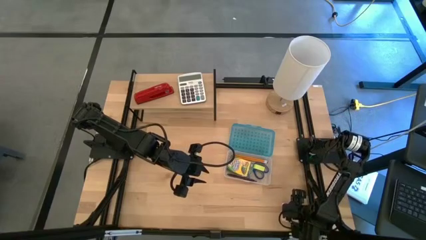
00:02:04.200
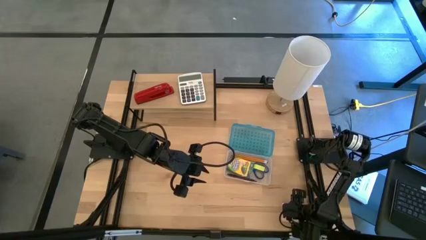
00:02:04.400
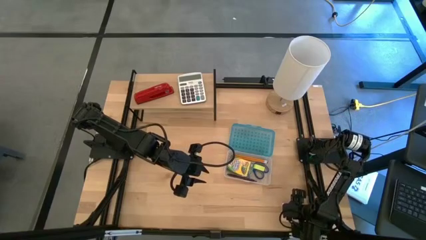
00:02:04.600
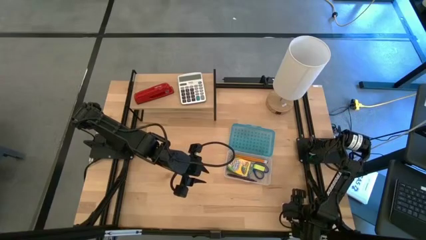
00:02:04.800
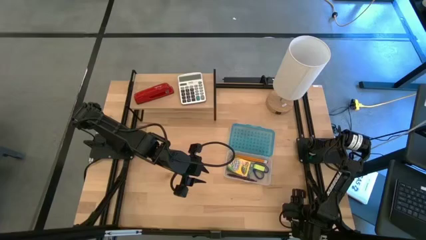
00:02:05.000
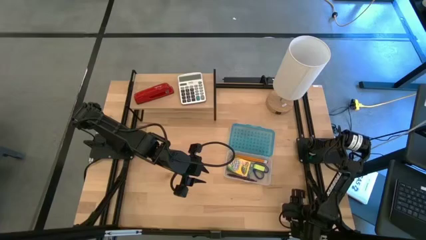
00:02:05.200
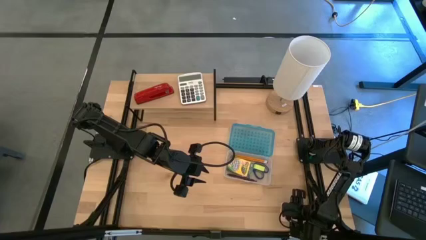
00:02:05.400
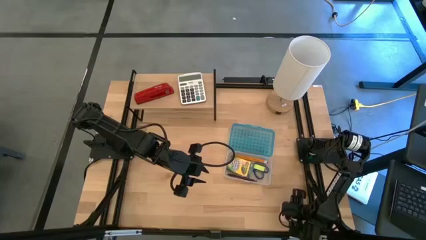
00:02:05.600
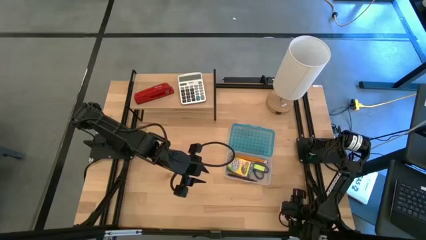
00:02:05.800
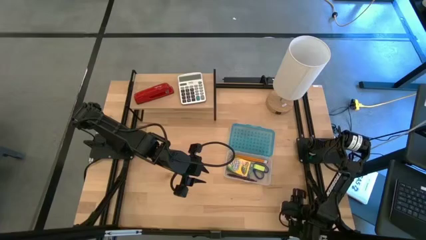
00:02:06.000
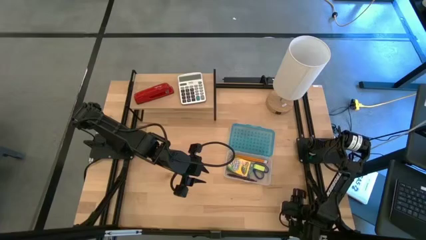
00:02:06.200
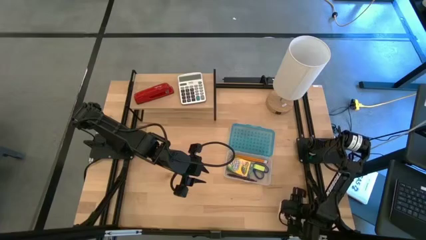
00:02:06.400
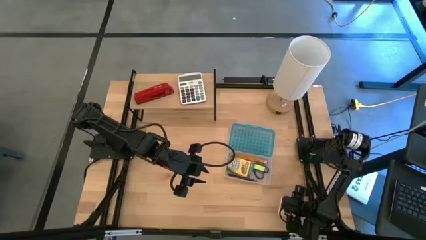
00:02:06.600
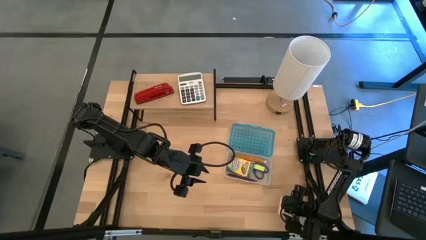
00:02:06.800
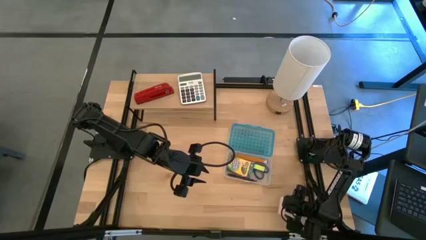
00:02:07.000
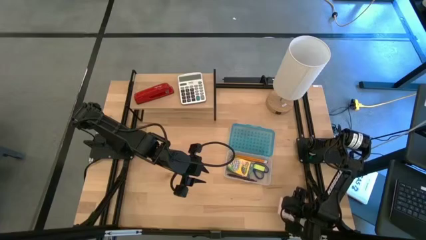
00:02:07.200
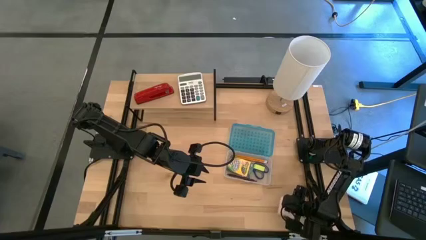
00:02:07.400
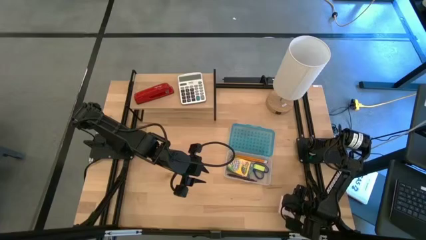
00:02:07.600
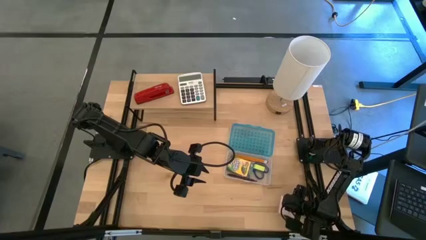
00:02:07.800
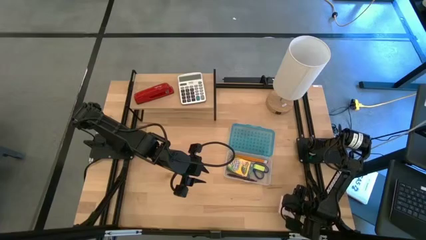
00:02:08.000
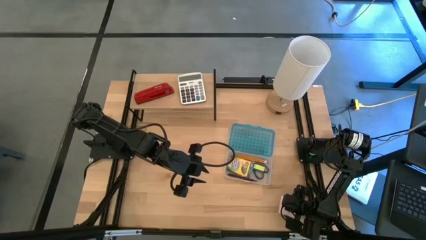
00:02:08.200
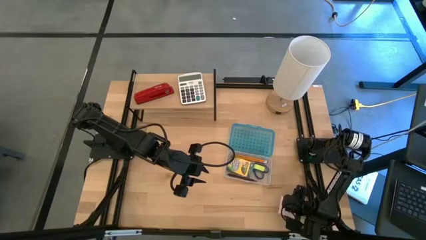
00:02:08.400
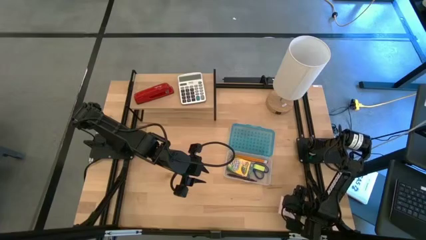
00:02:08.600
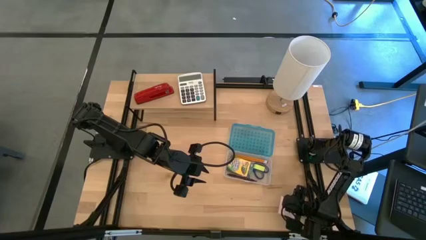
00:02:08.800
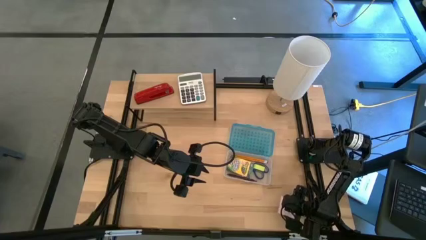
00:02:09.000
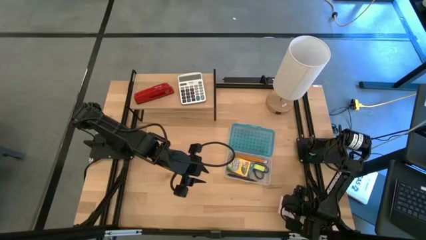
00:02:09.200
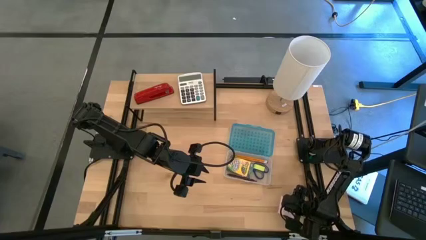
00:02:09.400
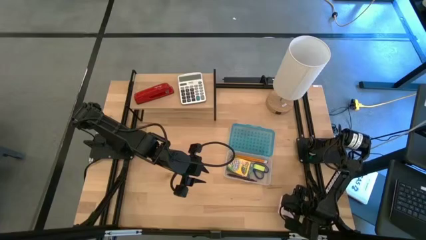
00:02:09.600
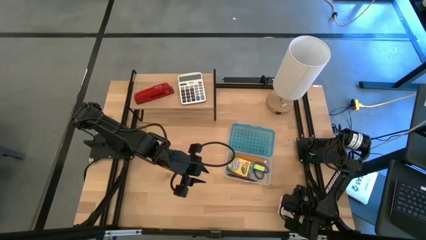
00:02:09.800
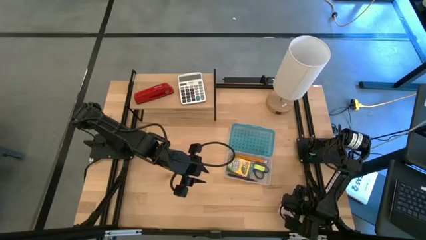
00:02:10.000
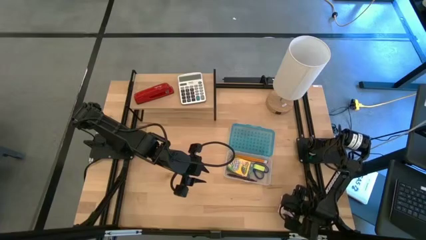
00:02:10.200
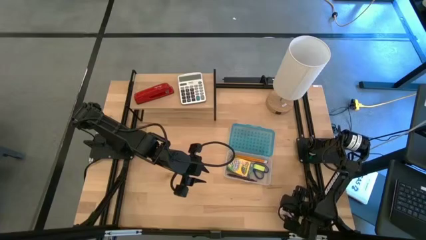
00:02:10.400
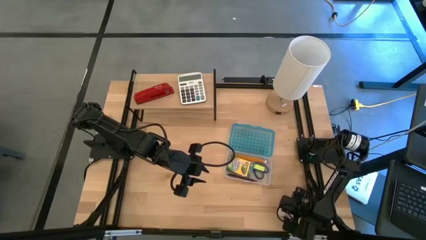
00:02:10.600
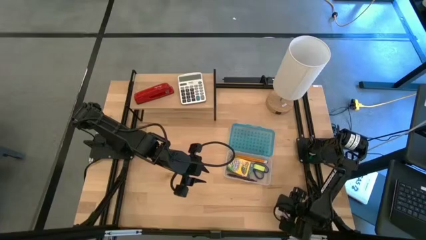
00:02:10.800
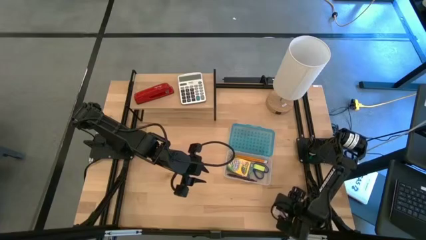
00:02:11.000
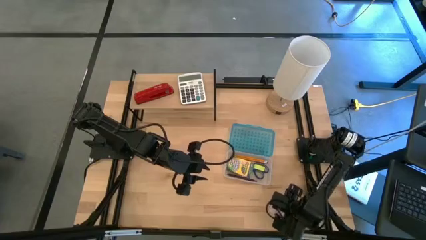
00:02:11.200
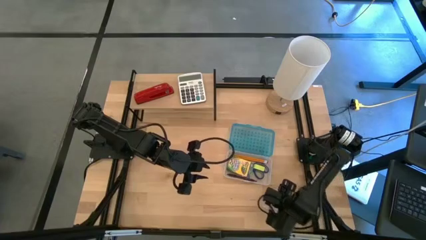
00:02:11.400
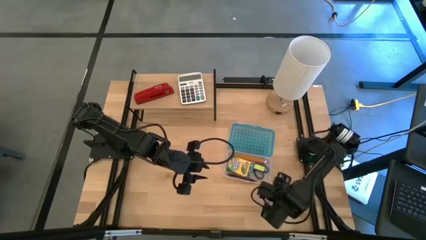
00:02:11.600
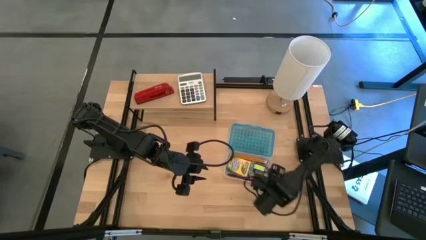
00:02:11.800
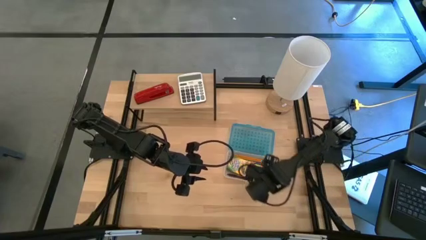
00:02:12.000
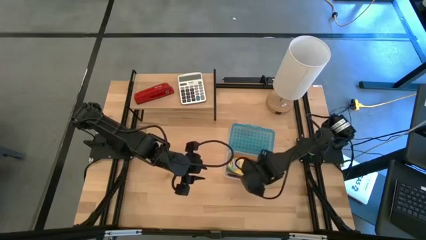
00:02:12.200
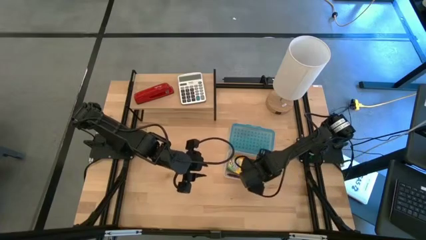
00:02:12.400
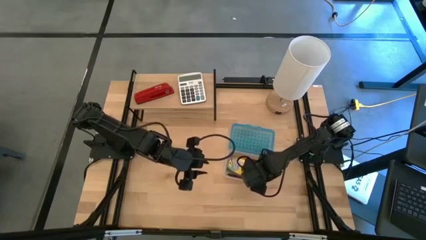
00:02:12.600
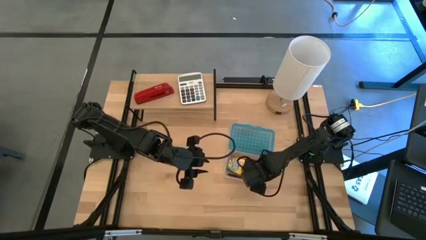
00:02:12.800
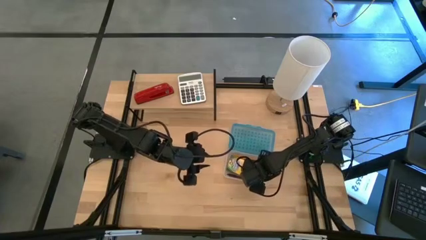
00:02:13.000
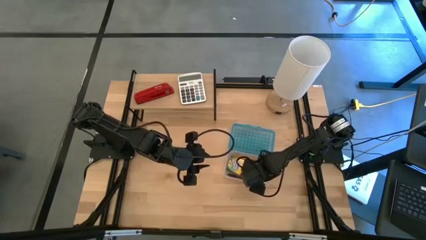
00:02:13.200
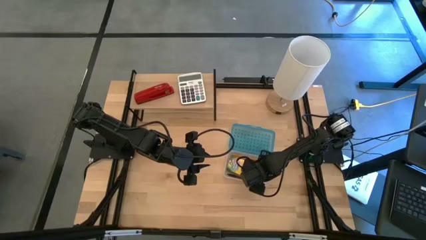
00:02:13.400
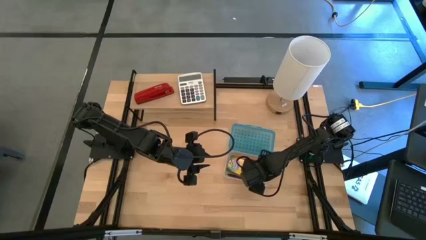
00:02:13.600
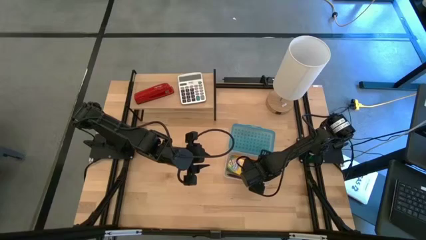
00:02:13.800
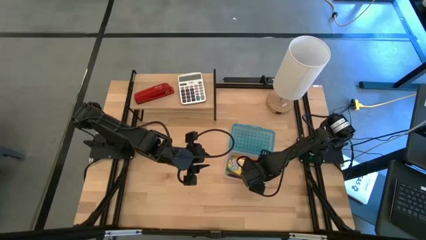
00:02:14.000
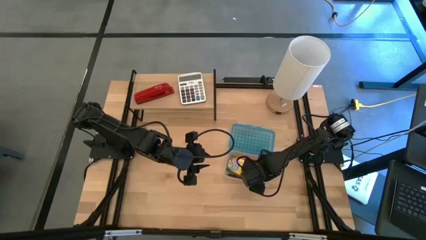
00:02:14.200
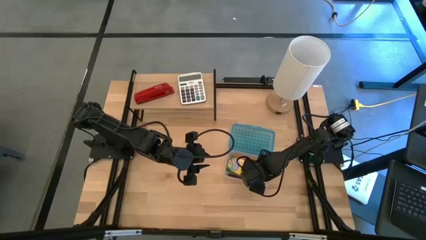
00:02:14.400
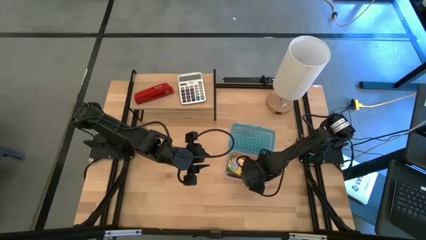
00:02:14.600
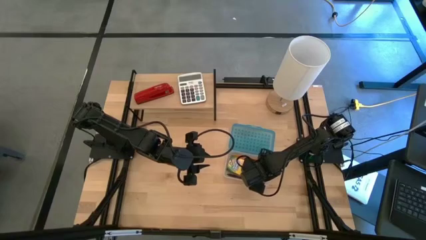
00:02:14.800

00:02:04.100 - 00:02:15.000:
Task: Pack school essentials
Put the pink sticky note into the blue supply box

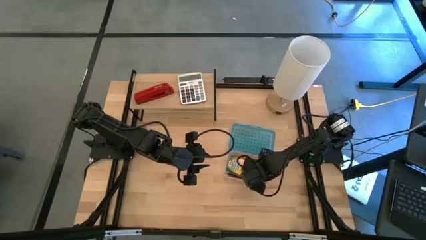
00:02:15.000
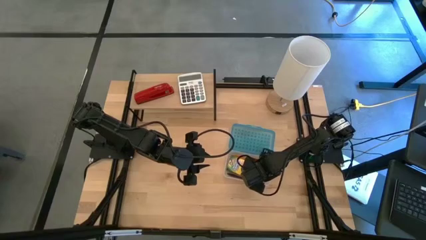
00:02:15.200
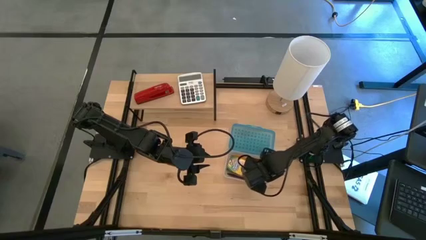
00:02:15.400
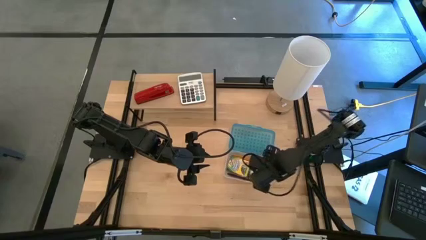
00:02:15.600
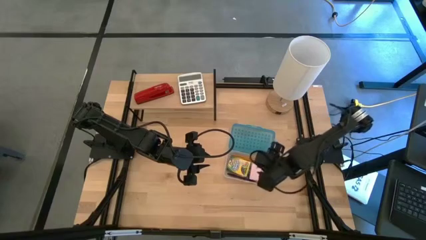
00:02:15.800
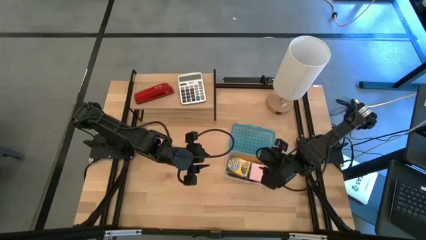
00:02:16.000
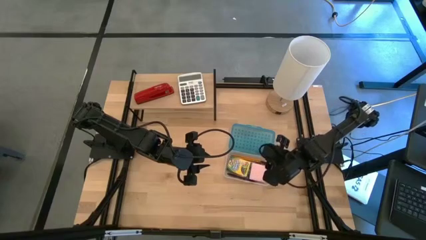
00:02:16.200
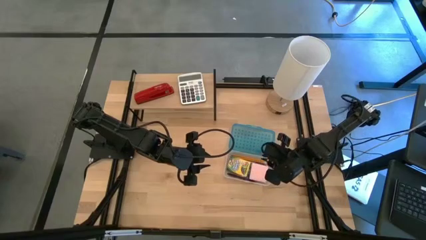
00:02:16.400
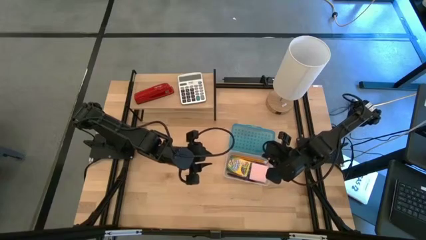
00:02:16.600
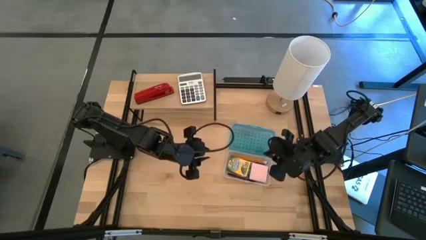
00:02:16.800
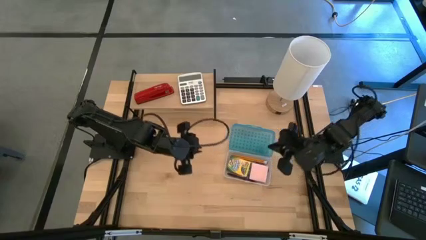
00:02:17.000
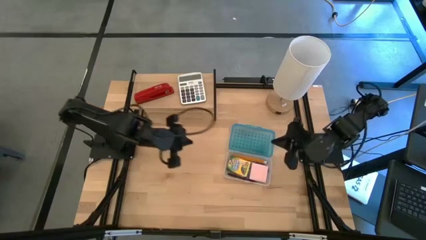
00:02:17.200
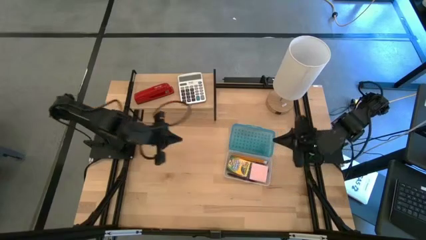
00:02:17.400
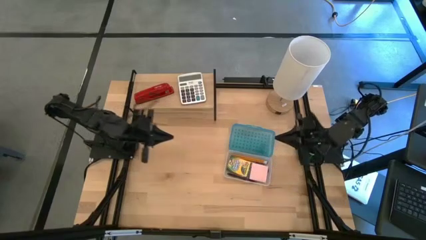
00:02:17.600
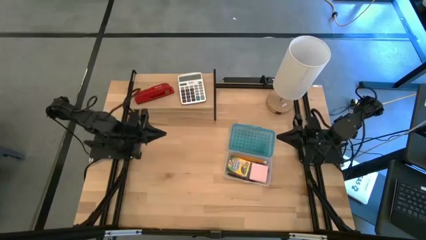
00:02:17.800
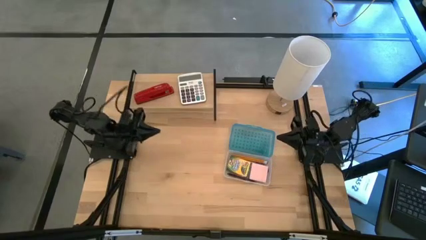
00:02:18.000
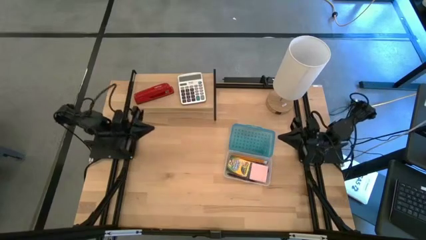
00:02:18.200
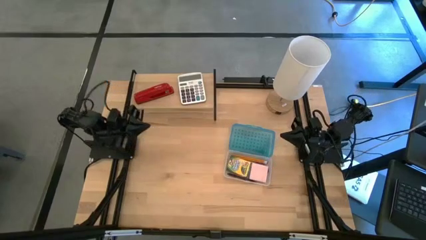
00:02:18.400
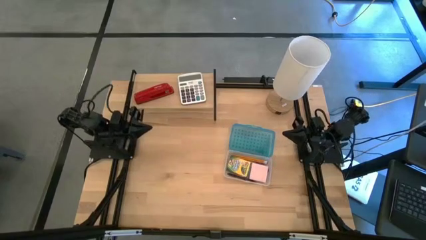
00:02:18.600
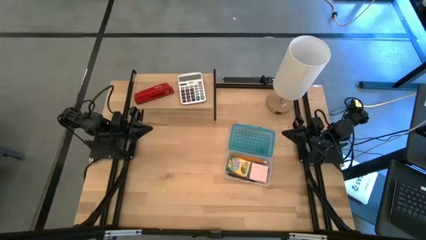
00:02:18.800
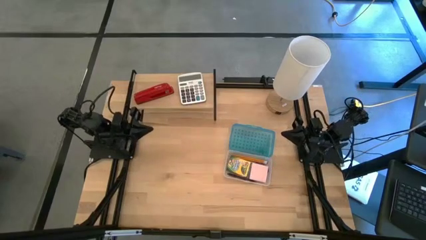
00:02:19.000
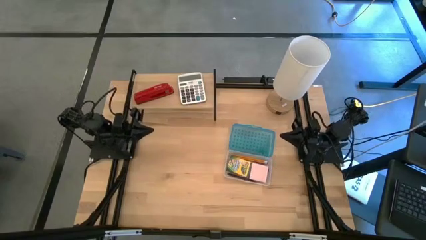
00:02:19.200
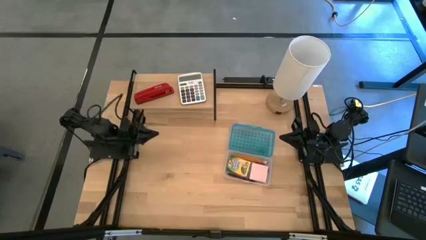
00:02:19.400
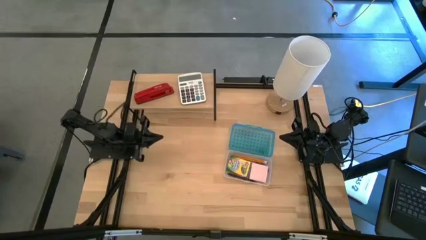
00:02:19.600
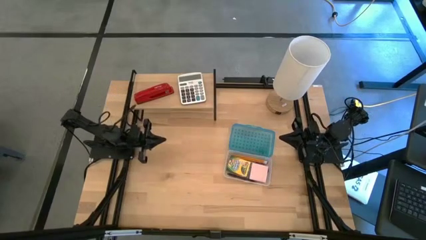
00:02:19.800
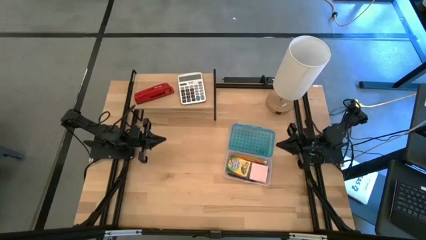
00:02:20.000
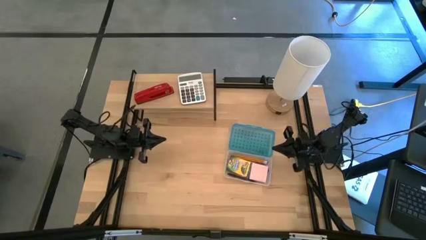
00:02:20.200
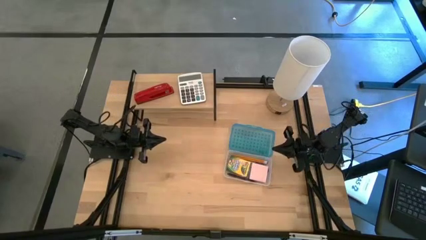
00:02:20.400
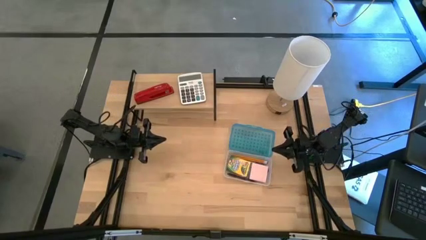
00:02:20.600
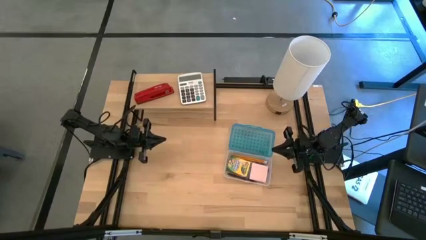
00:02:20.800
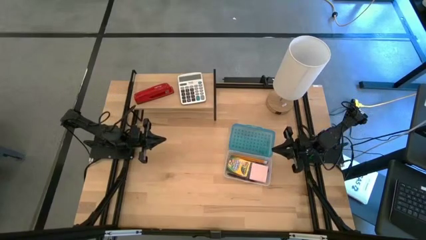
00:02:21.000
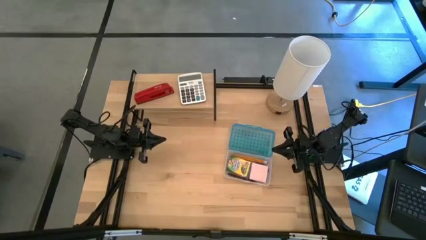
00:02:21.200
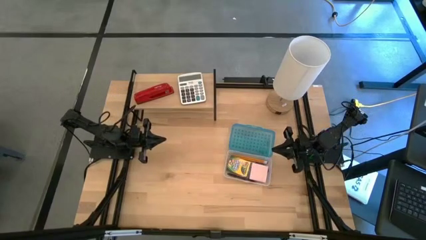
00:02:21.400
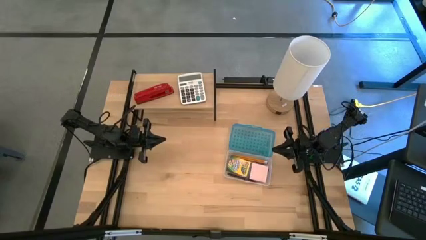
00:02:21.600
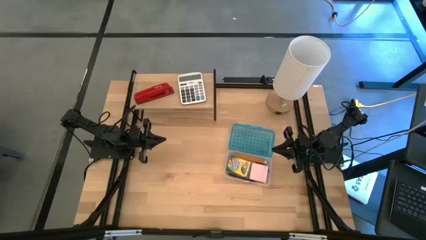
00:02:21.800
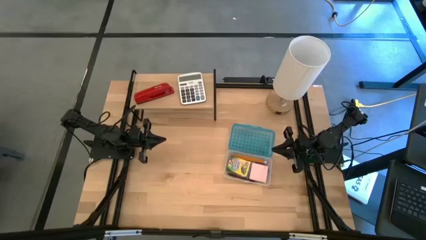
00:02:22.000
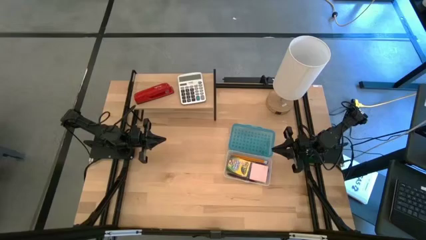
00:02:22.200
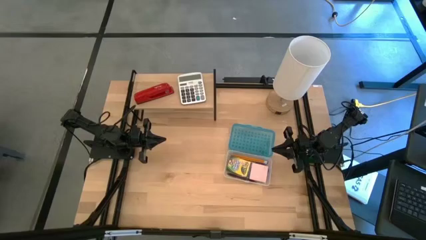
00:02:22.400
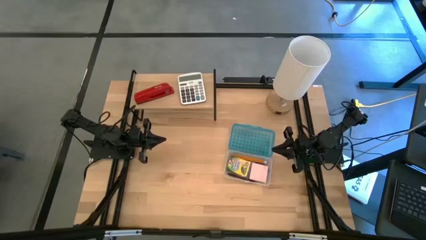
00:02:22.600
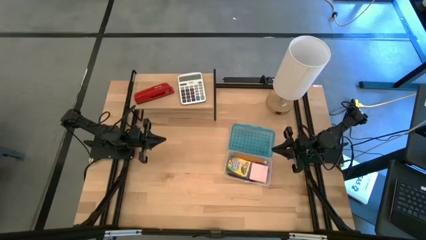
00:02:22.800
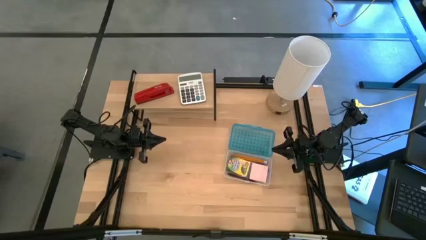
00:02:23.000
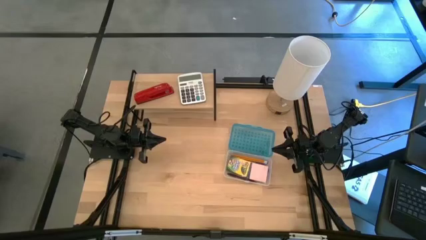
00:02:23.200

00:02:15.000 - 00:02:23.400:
Return to Home Position
